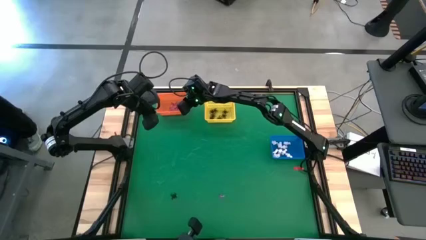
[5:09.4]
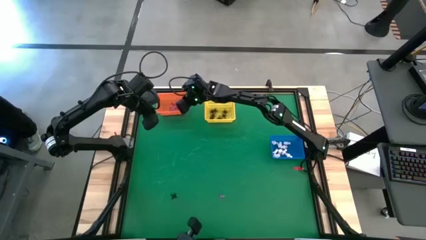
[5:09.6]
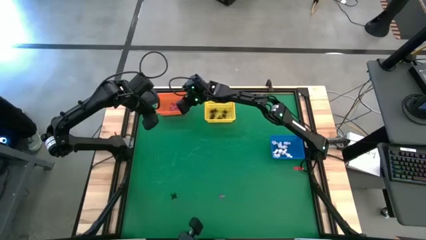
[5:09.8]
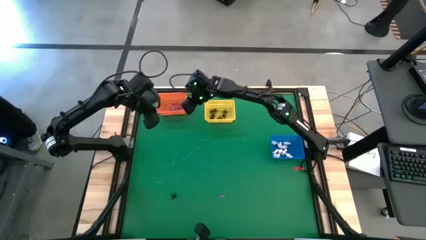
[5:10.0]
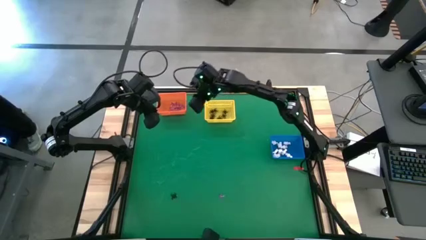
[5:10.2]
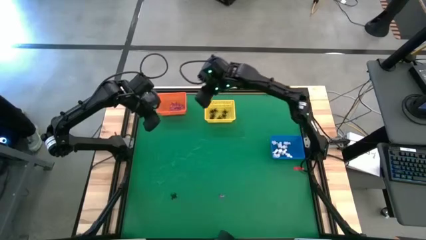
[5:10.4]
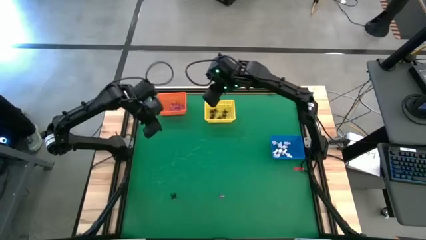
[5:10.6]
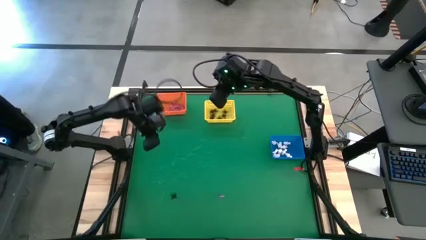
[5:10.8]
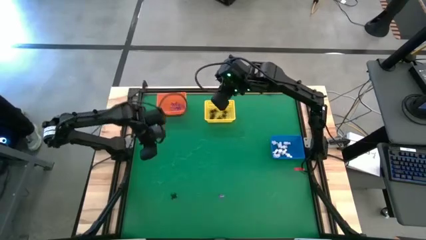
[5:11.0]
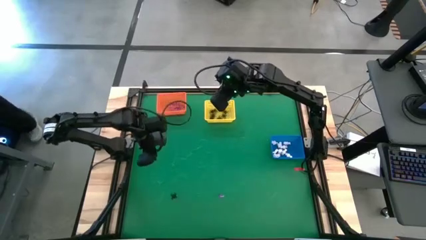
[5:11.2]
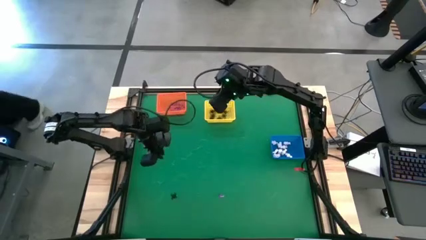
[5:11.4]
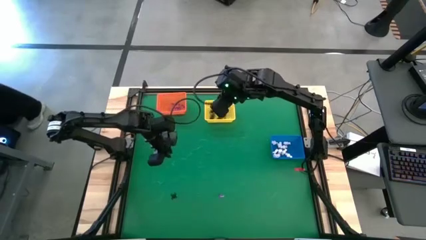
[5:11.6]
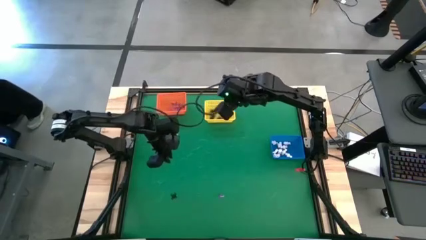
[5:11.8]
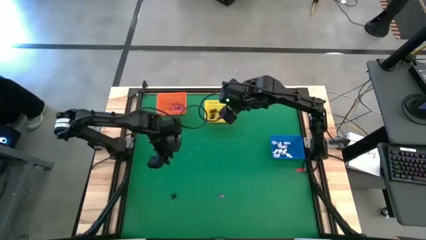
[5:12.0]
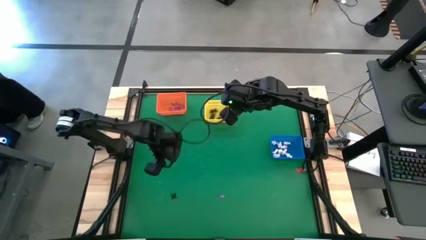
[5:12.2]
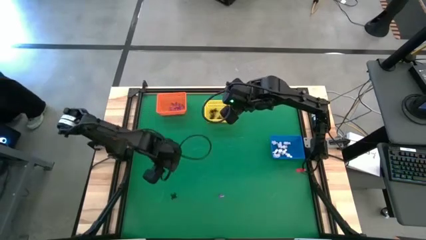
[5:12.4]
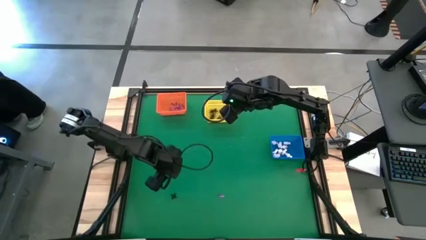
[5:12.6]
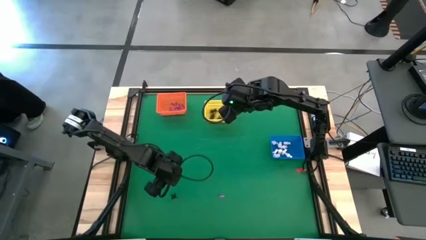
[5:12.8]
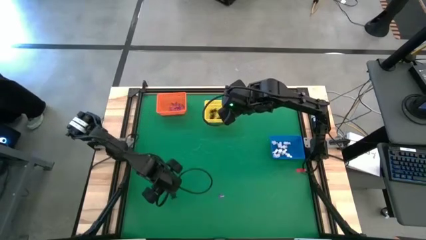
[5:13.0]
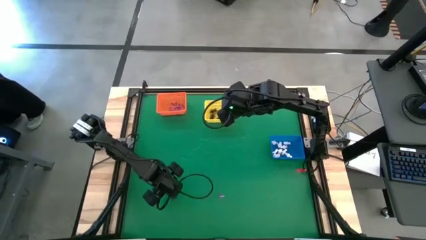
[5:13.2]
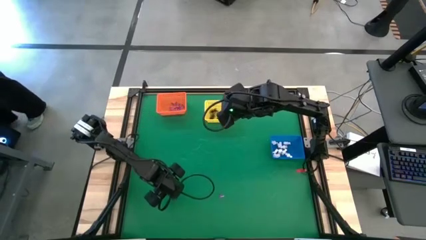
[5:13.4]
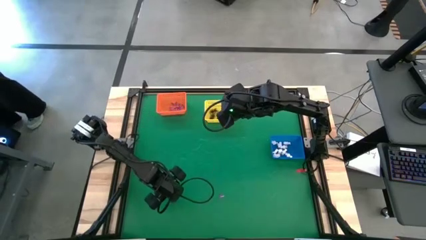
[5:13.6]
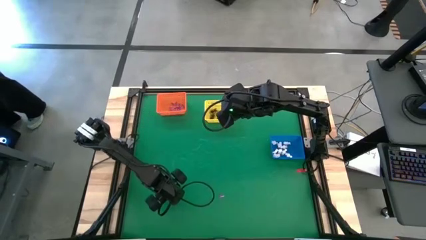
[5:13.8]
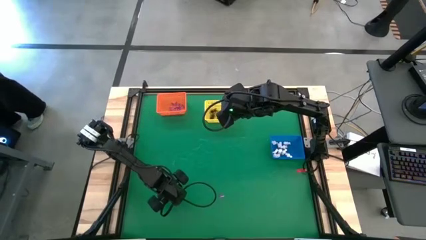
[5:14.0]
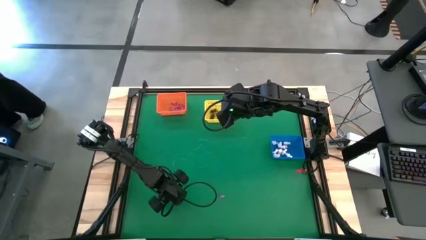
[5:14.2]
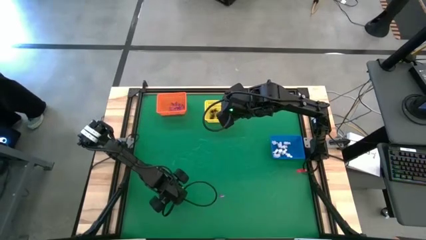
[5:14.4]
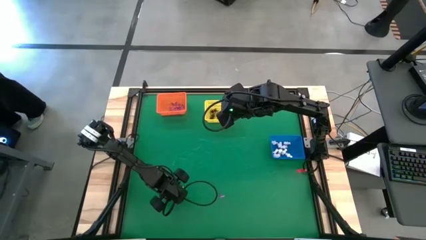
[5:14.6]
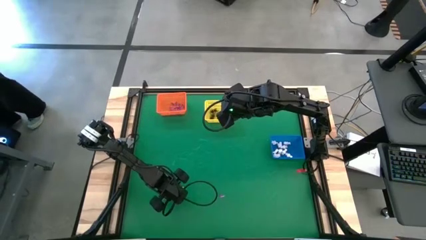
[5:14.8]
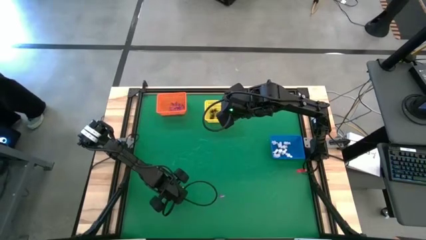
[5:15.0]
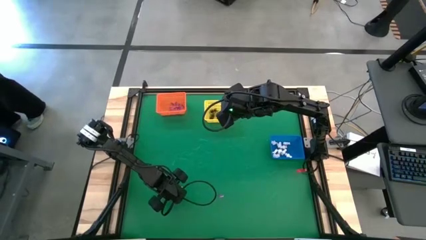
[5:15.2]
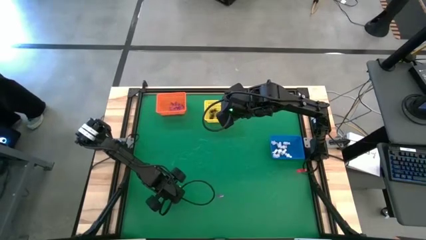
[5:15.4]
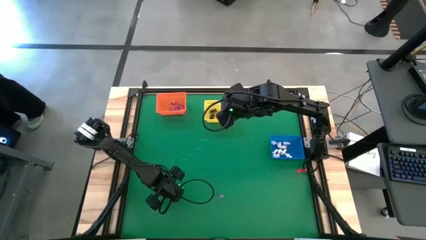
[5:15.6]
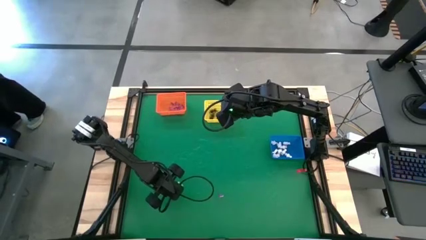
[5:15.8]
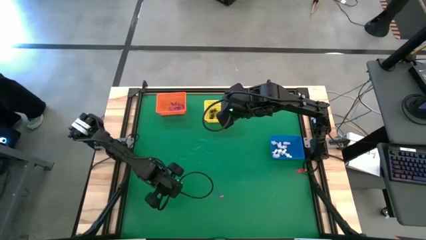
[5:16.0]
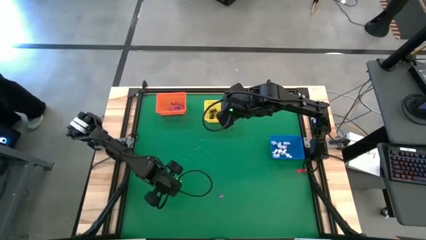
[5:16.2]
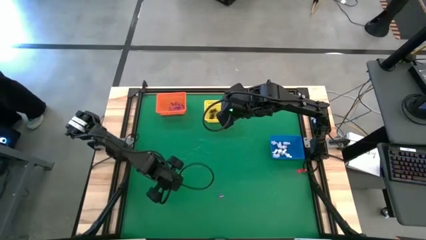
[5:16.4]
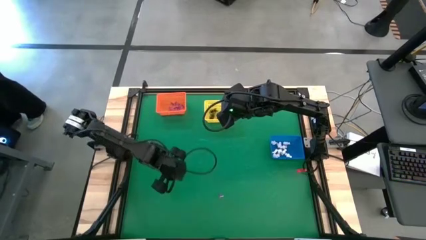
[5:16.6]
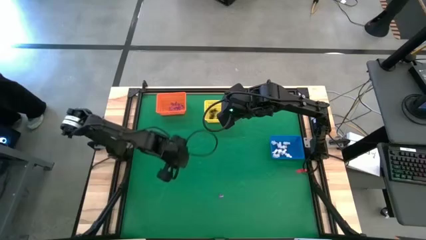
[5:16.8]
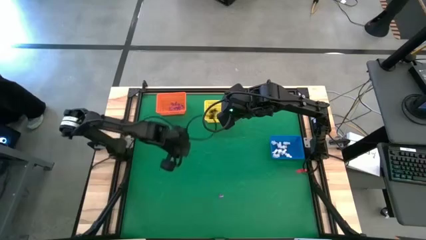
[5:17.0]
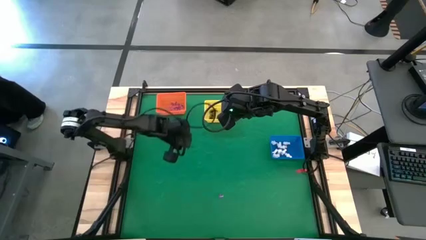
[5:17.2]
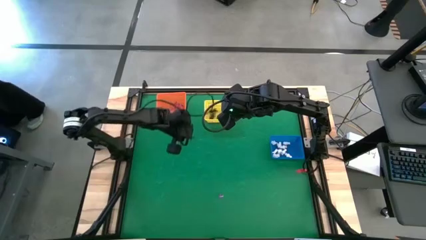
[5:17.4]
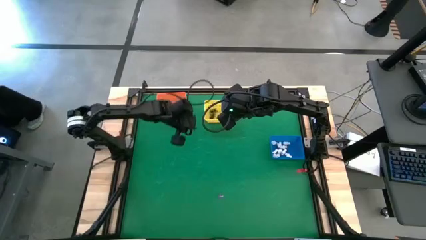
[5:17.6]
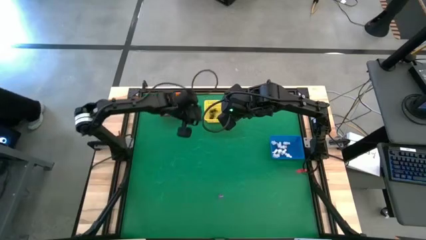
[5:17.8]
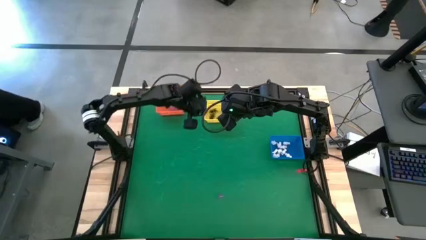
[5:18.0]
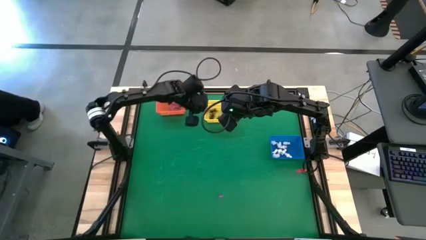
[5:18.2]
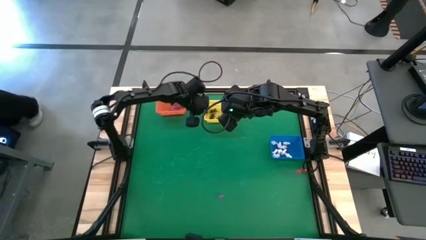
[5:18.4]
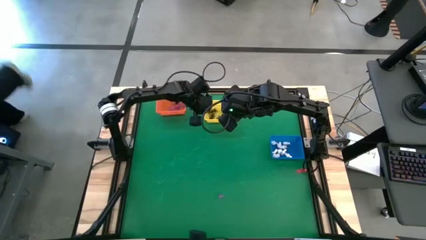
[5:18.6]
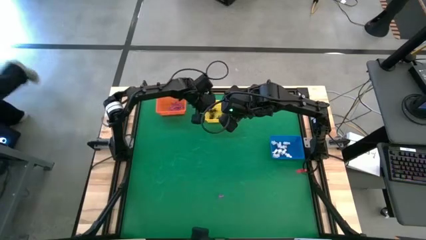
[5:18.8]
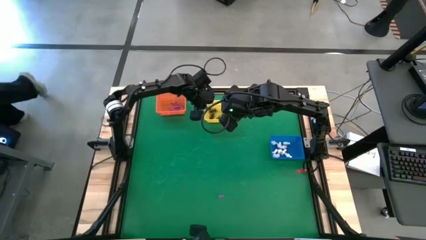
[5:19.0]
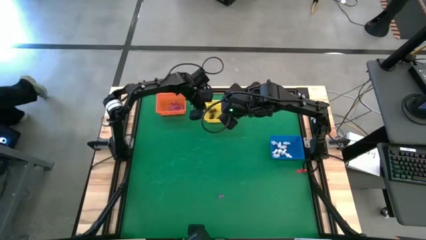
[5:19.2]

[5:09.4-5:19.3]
Task: Sort Halloween decoration
Put the black spider toy into the yellow basket

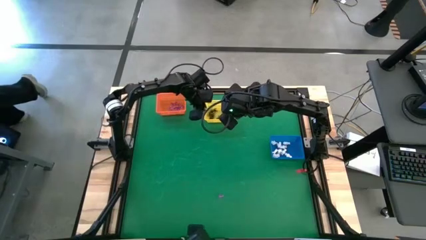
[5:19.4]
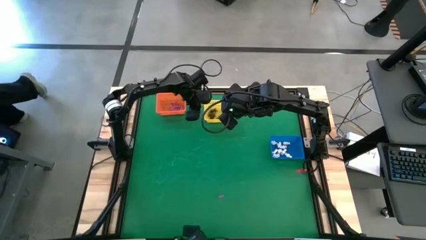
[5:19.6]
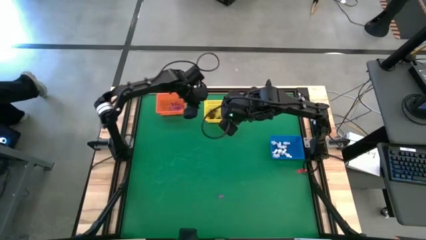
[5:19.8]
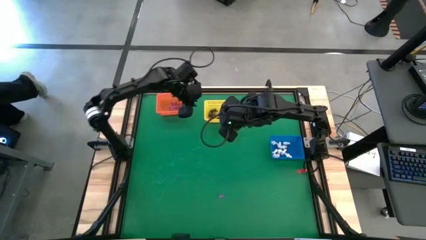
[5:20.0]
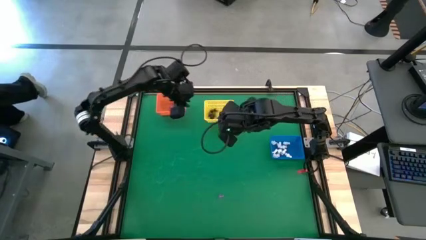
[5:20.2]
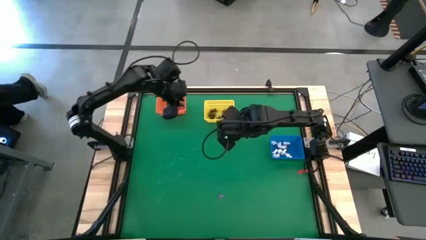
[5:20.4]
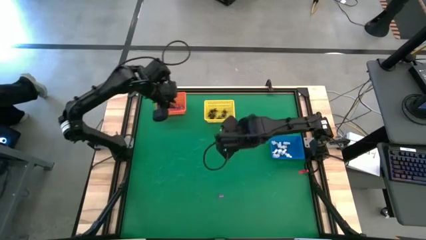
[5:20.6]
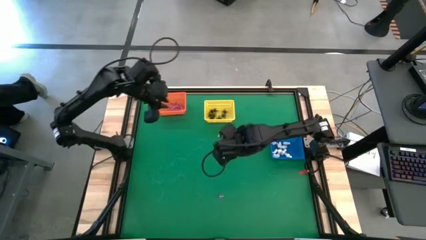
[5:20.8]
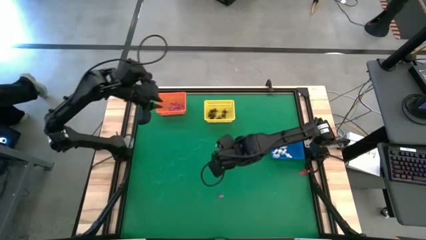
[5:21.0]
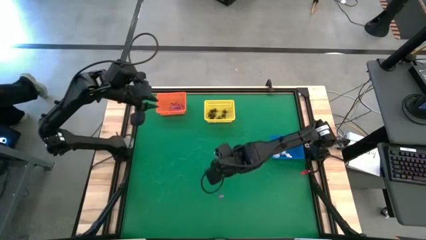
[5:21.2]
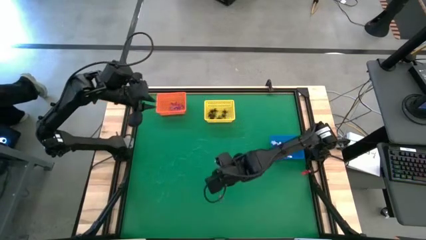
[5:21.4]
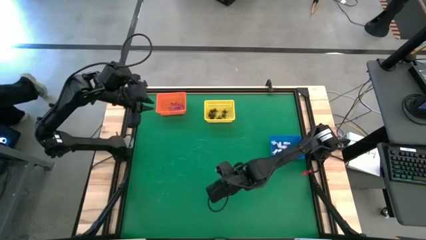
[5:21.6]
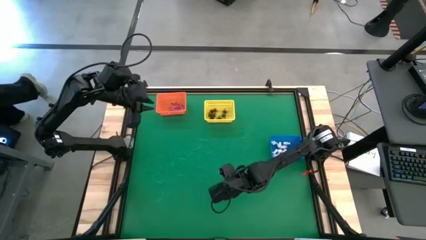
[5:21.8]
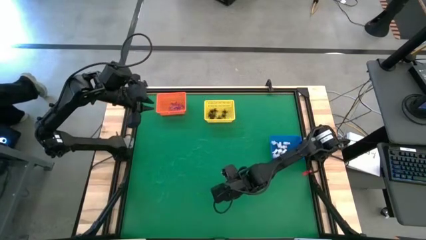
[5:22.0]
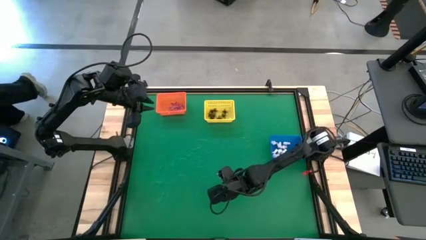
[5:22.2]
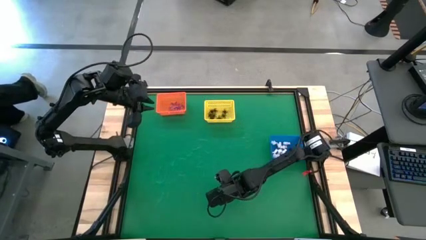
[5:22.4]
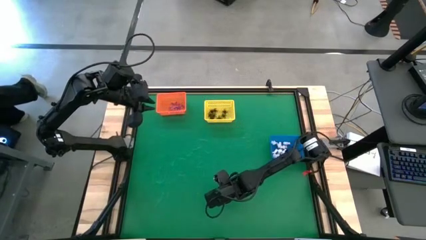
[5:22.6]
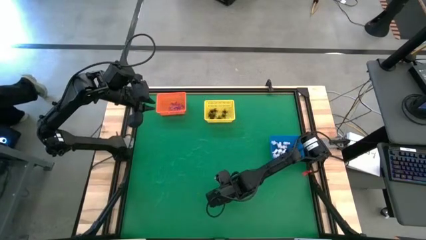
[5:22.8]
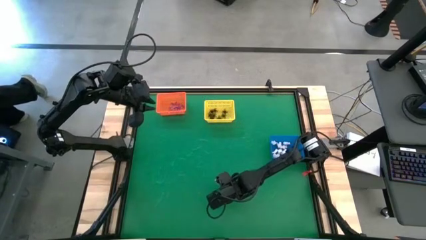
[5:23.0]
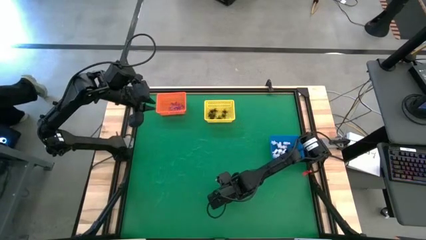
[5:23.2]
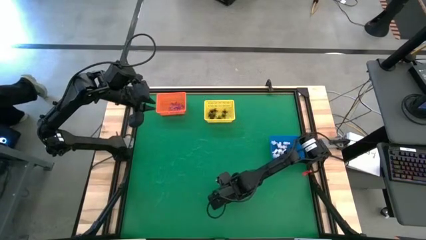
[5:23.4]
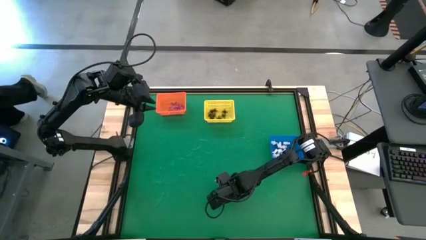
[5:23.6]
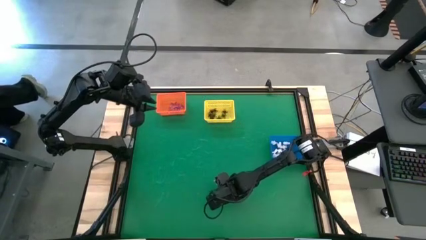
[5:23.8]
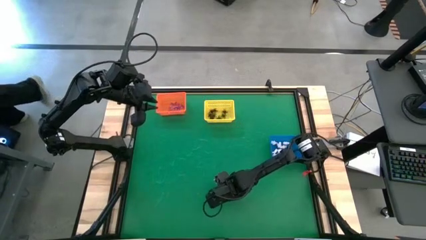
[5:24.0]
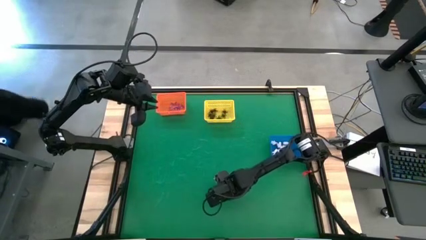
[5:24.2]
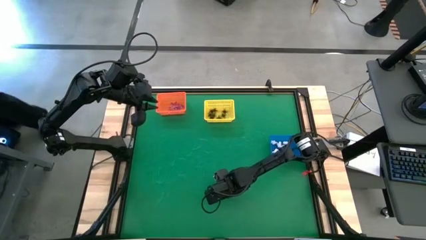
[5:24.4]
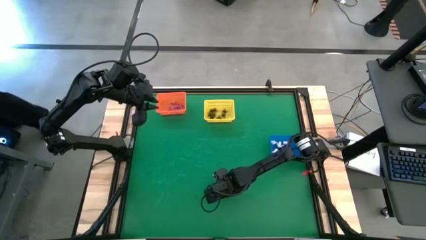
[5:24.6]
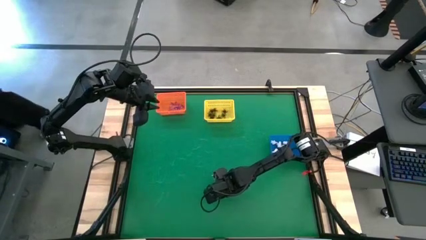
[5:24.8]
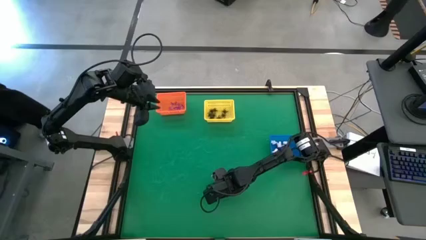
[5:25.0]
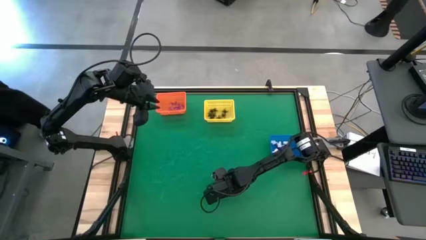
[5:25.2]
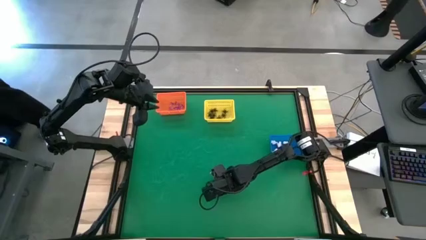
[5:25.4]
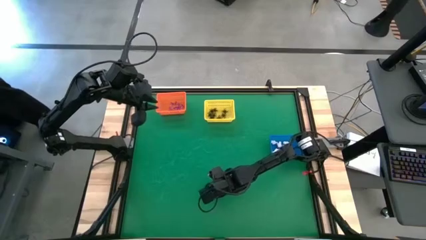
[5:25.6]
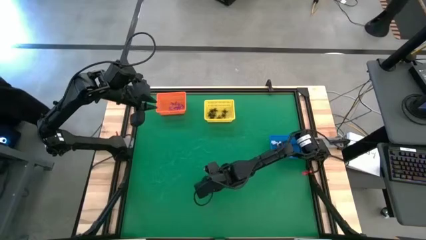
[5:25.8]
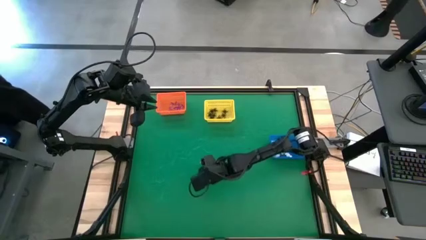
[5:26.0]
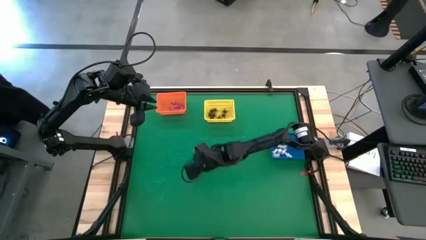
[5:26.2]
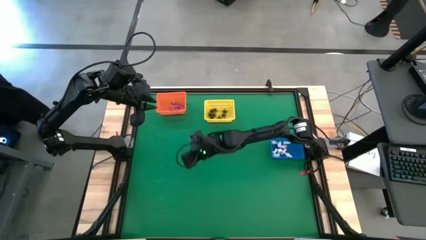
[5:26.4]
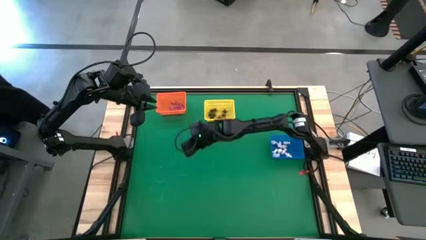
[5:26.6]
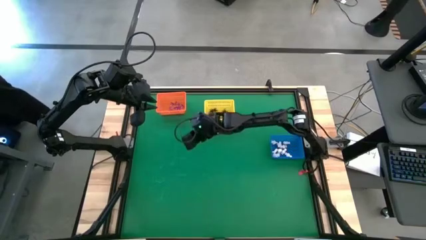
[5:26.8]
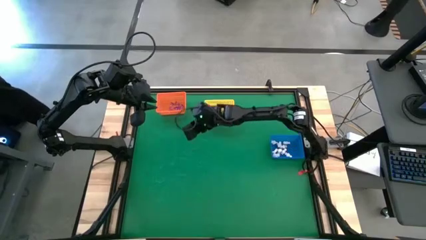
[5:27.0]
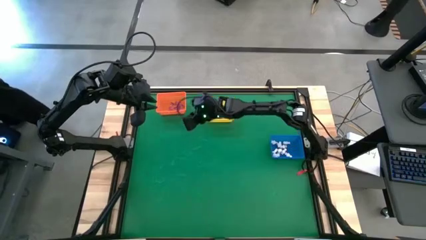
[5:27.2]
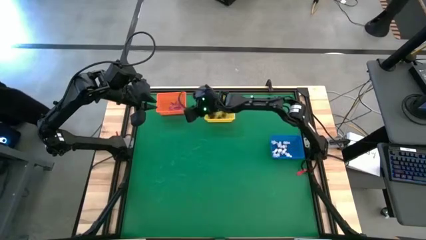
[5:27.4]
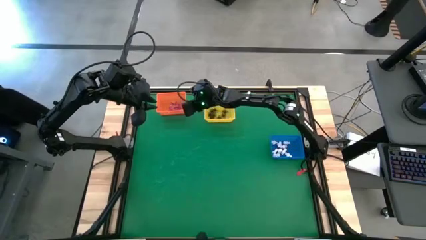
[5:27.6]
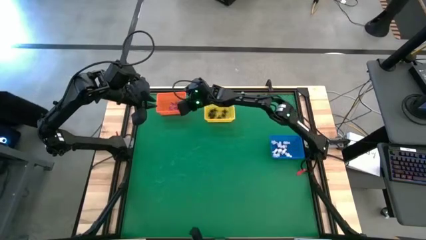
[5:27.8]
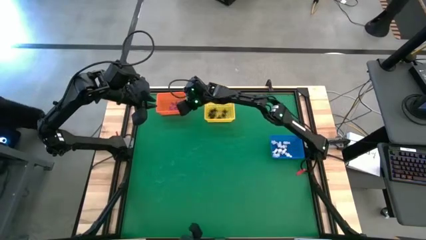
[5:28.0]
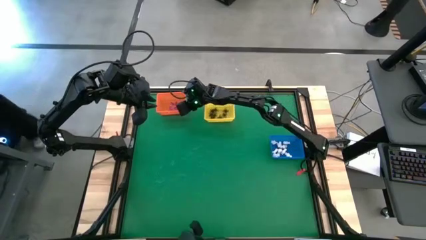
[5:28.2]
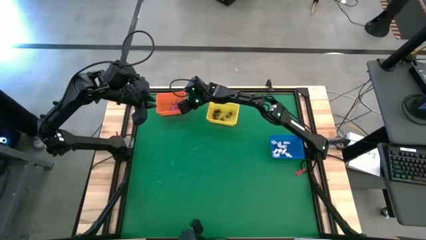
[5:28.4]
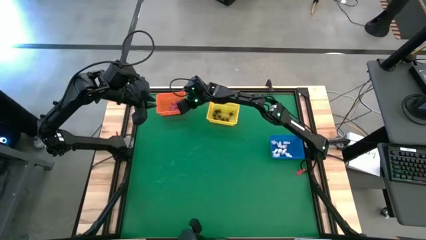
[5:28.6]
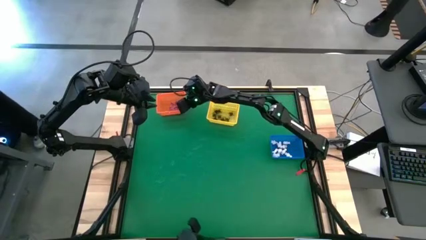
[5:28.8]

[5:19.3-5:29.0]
Put the violet hat toy into the orange basket
